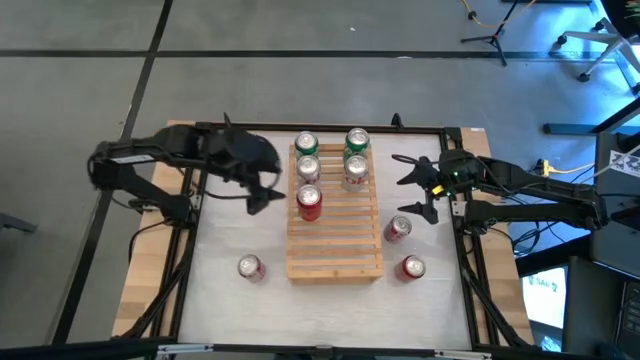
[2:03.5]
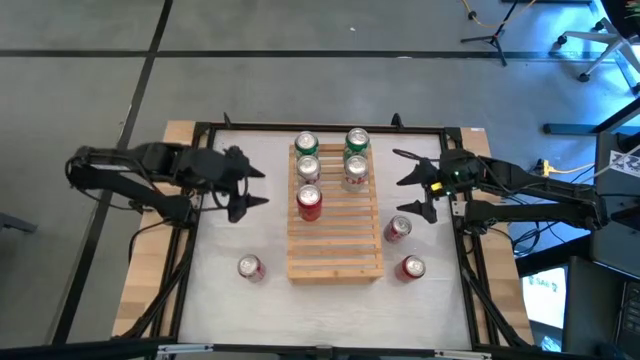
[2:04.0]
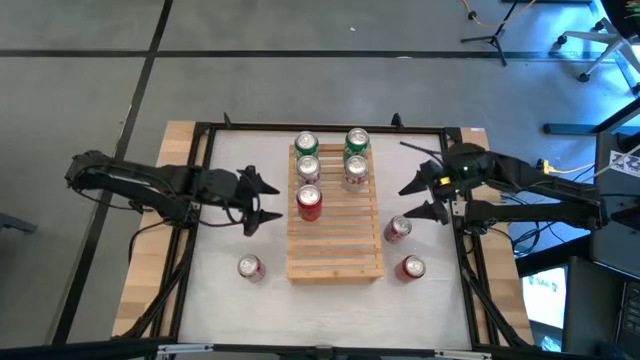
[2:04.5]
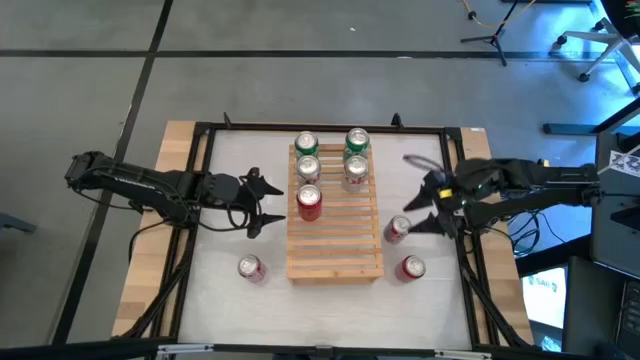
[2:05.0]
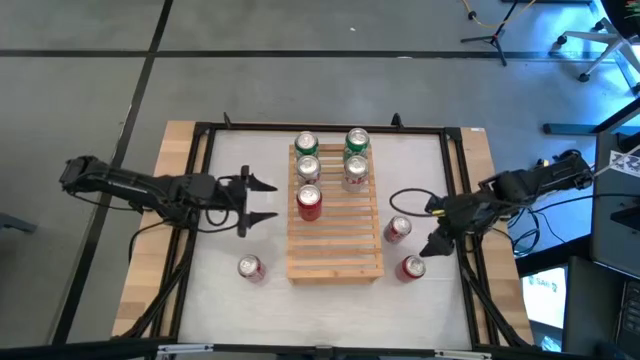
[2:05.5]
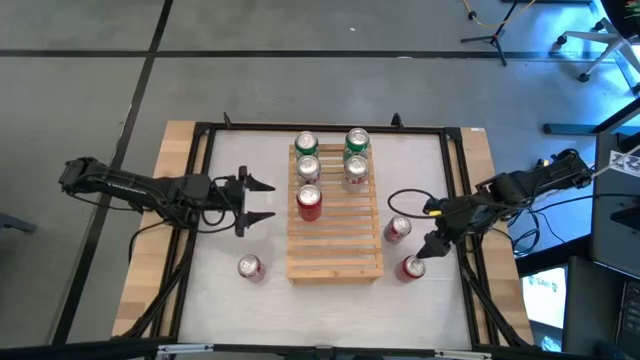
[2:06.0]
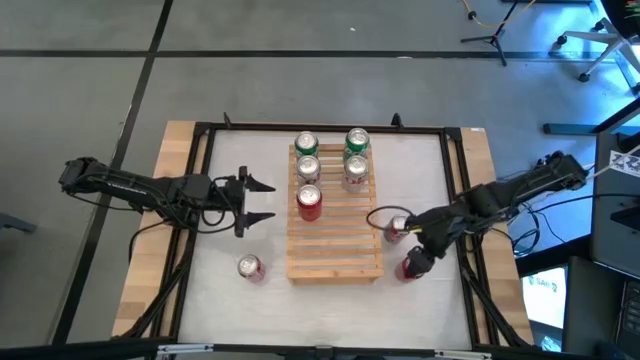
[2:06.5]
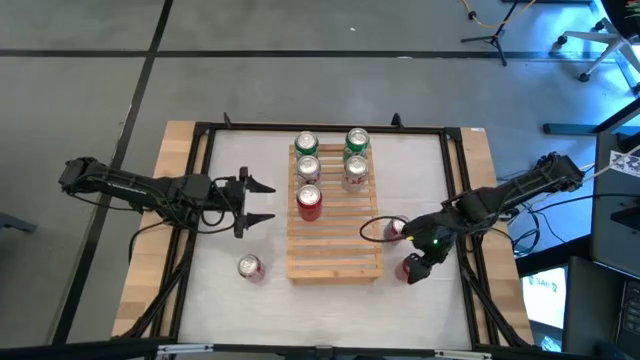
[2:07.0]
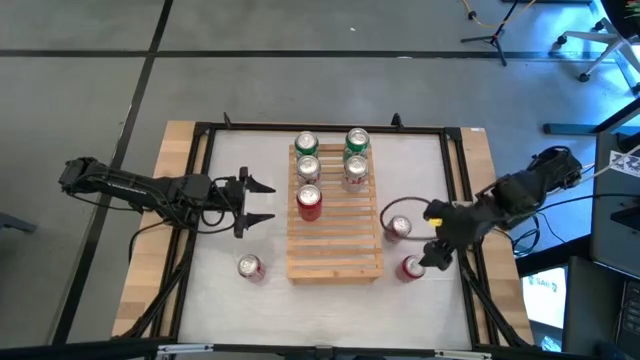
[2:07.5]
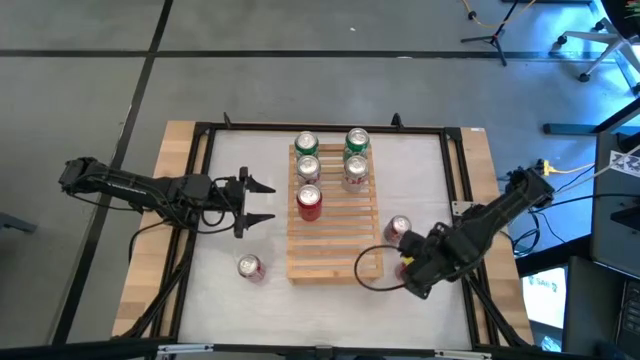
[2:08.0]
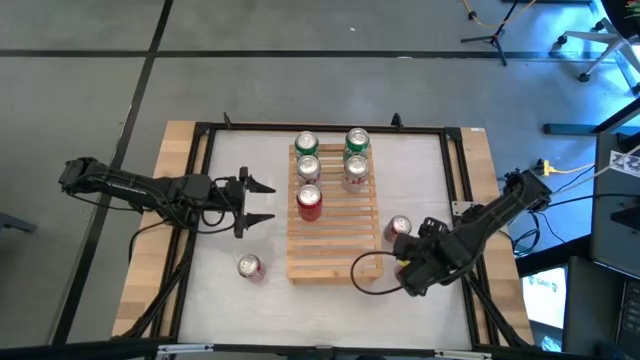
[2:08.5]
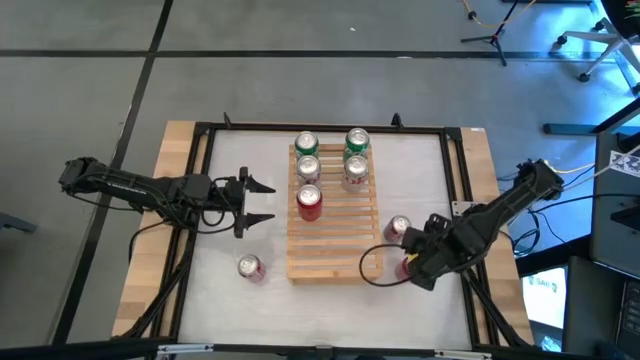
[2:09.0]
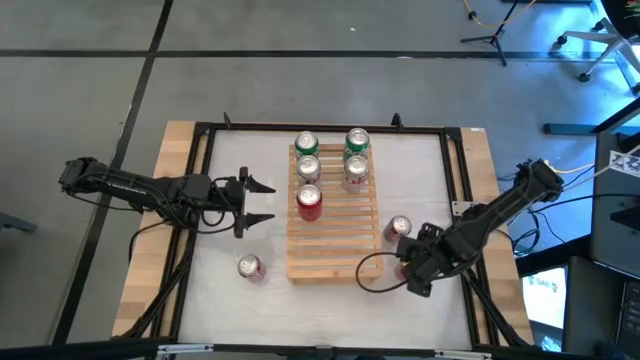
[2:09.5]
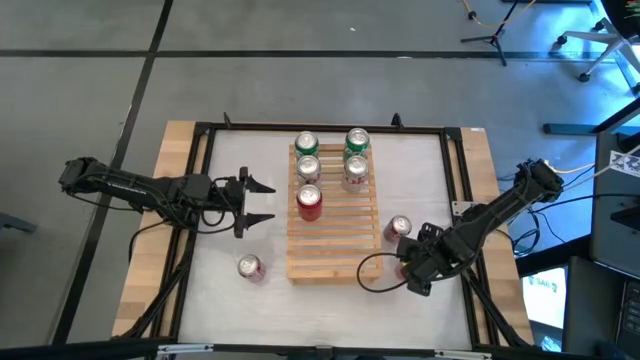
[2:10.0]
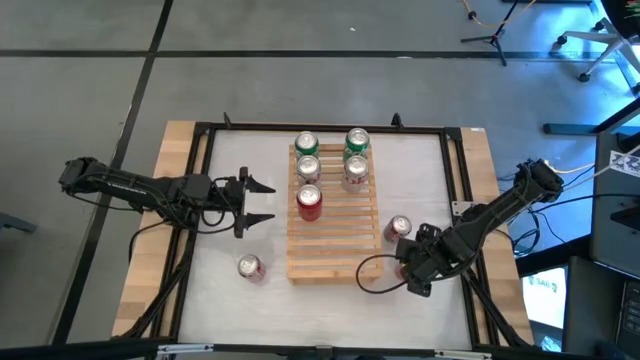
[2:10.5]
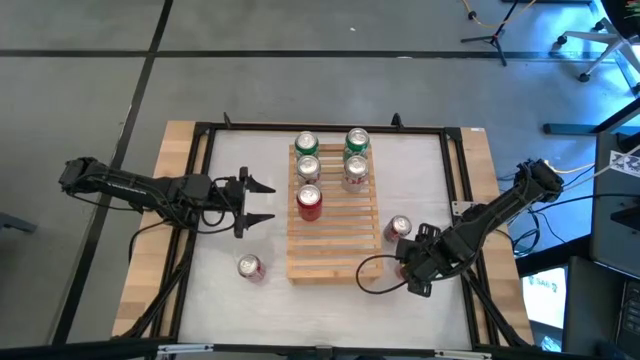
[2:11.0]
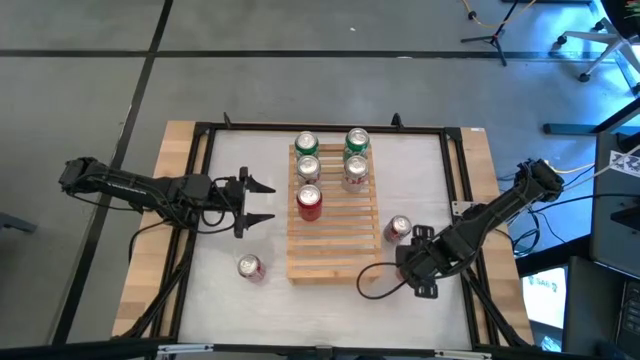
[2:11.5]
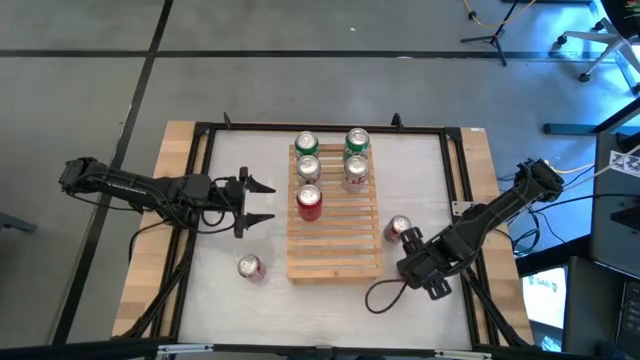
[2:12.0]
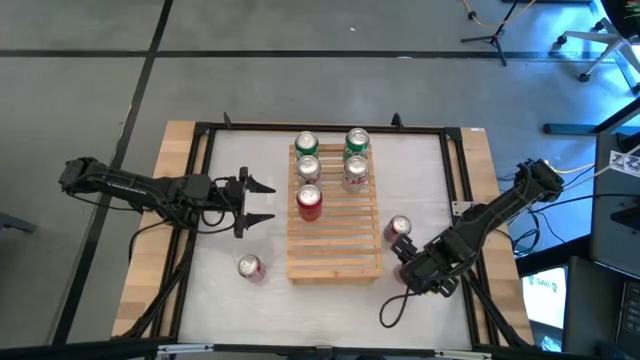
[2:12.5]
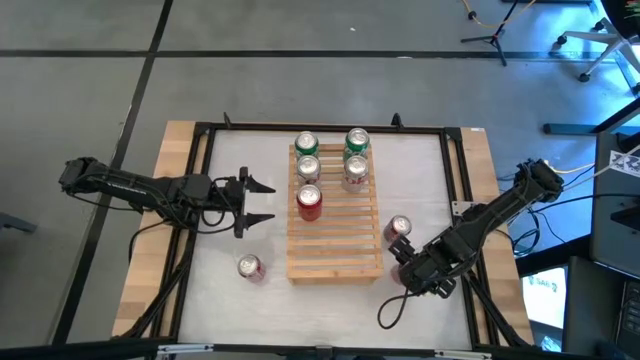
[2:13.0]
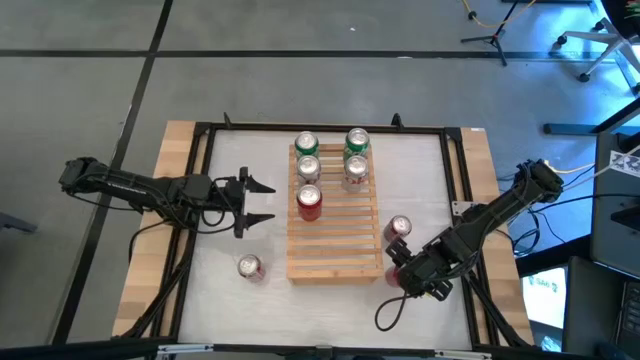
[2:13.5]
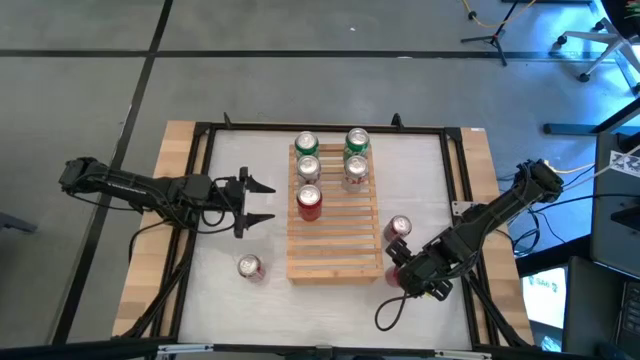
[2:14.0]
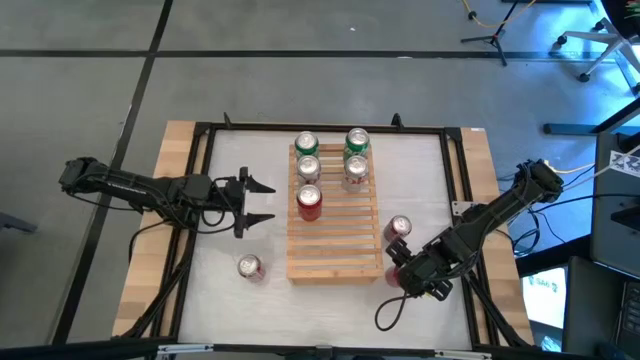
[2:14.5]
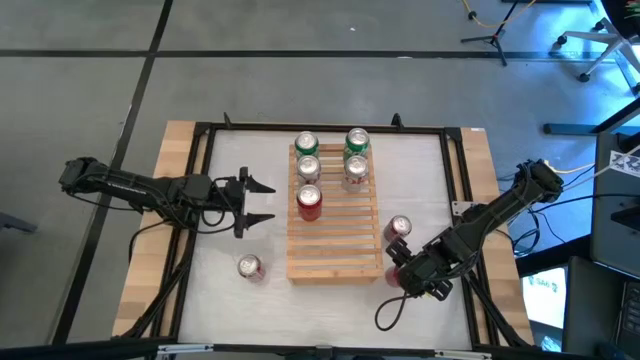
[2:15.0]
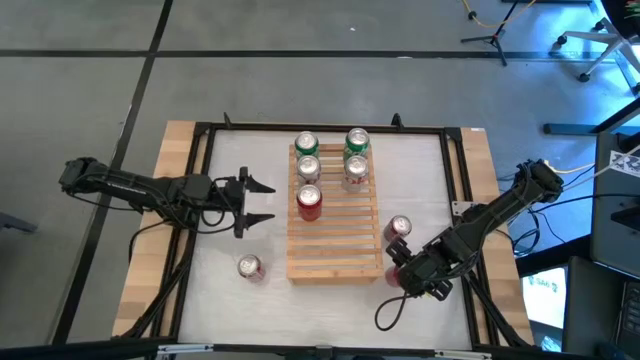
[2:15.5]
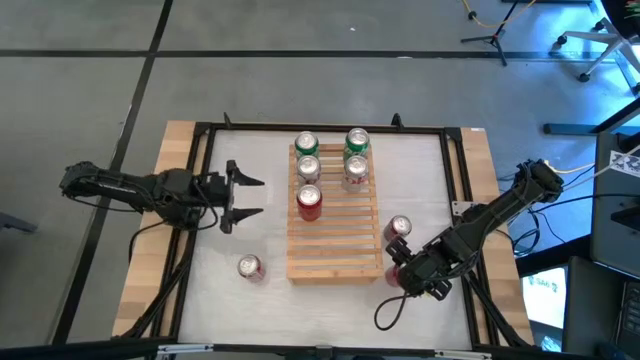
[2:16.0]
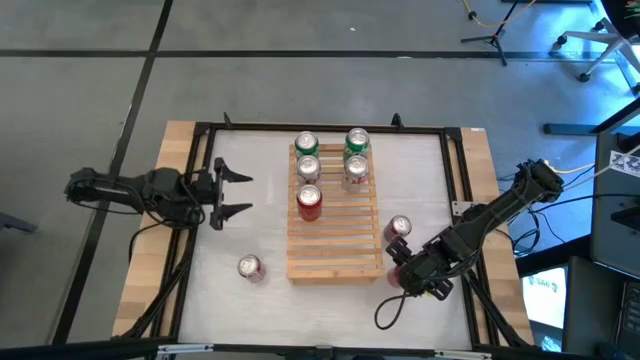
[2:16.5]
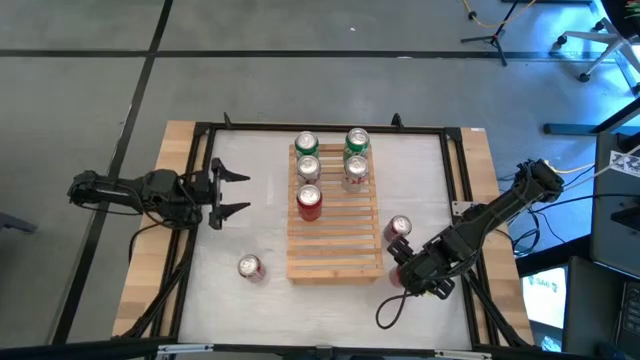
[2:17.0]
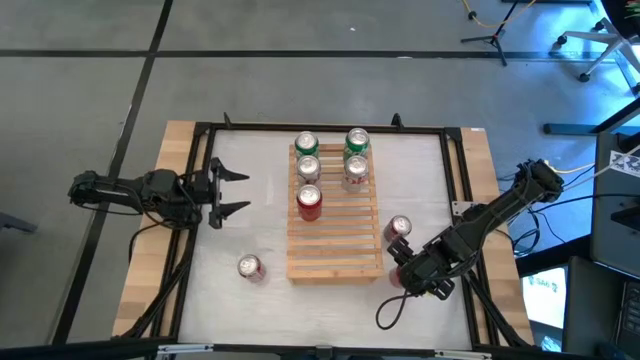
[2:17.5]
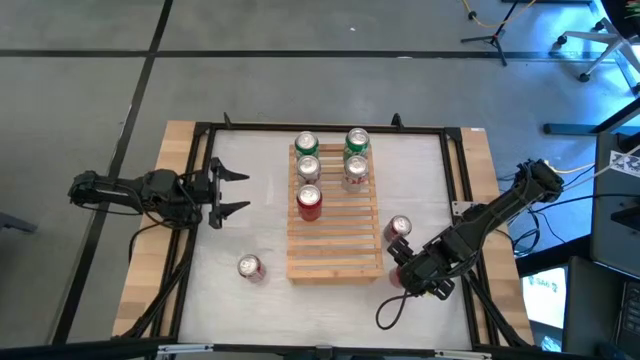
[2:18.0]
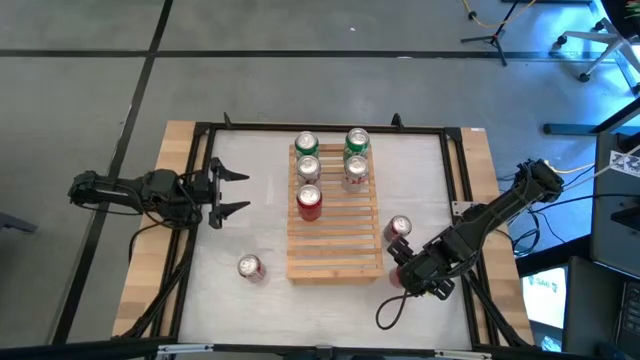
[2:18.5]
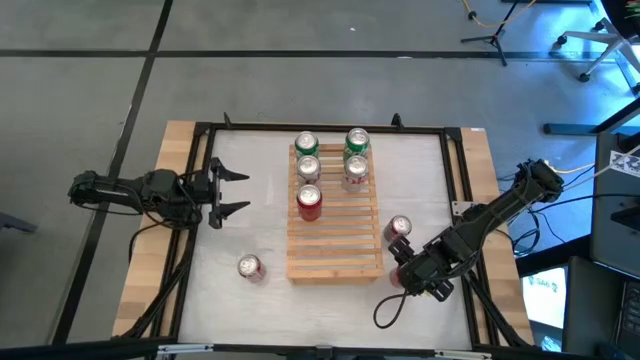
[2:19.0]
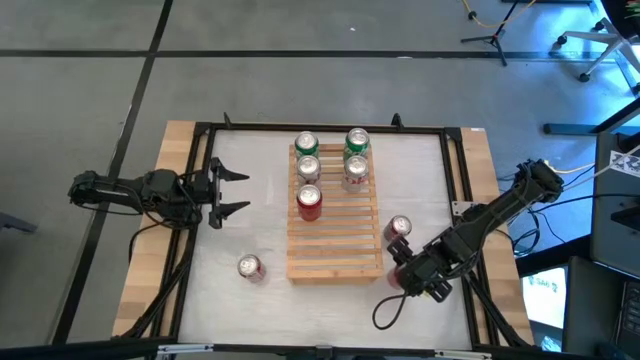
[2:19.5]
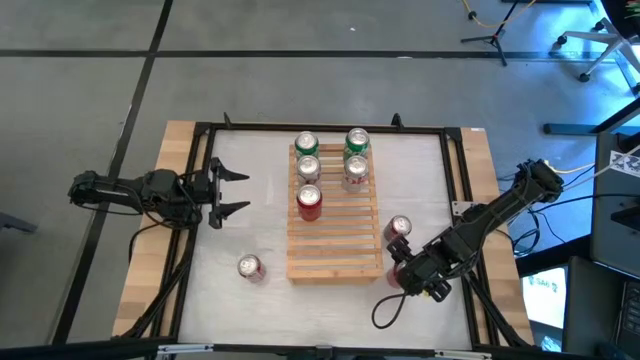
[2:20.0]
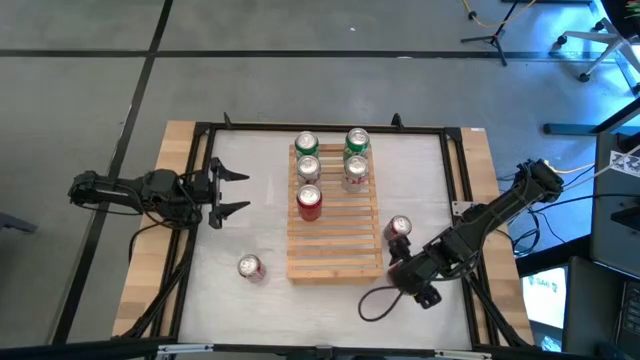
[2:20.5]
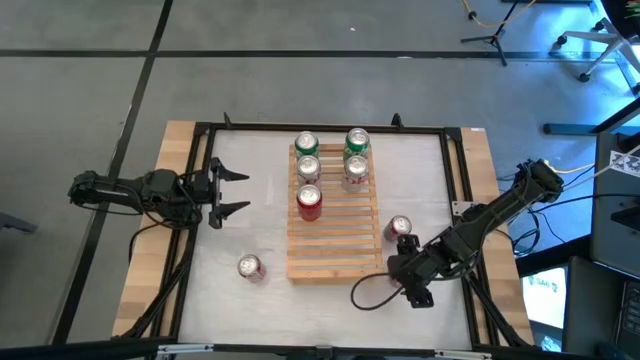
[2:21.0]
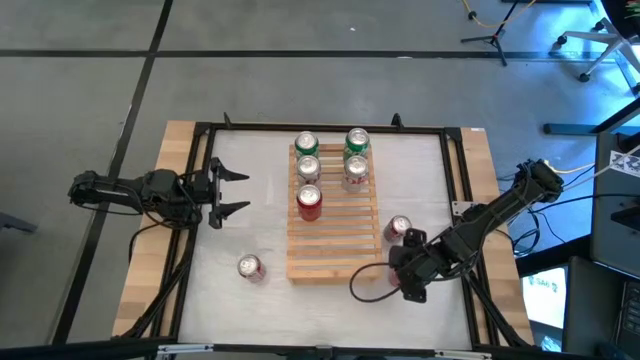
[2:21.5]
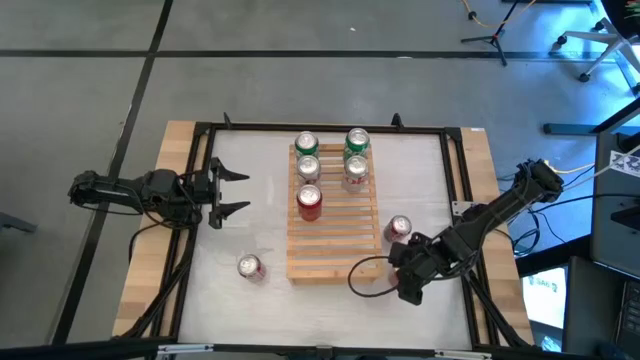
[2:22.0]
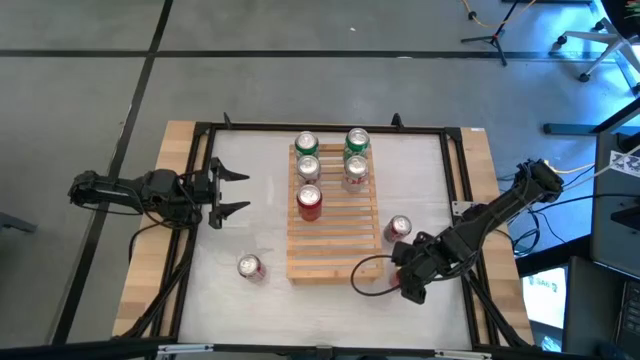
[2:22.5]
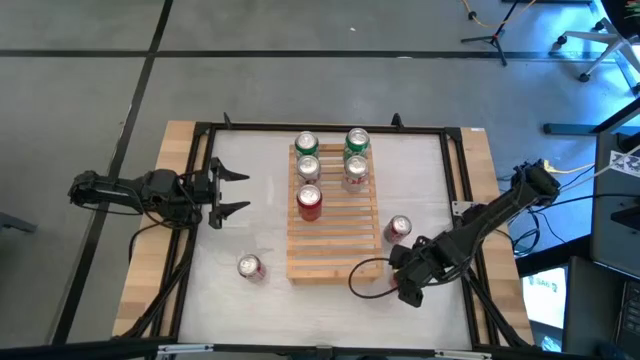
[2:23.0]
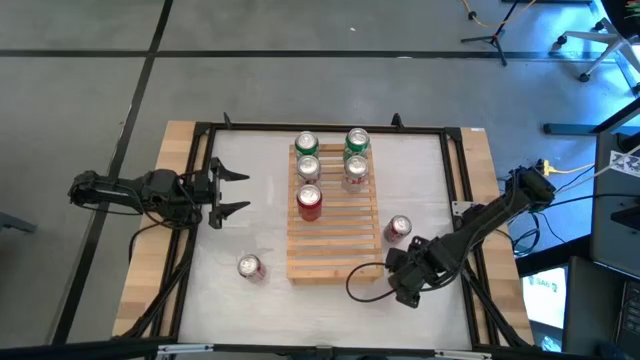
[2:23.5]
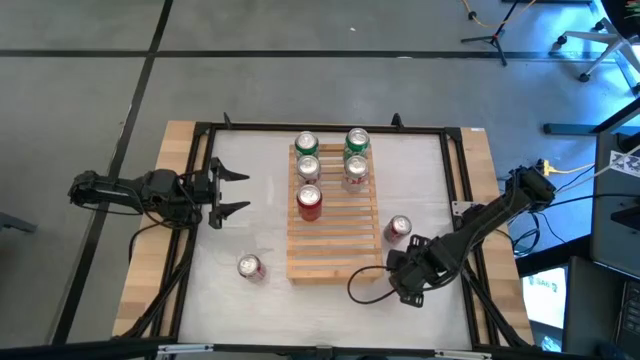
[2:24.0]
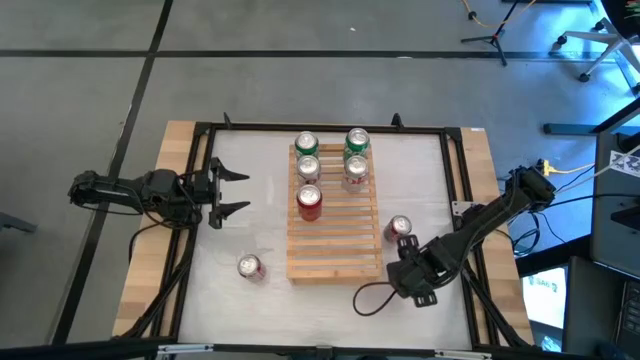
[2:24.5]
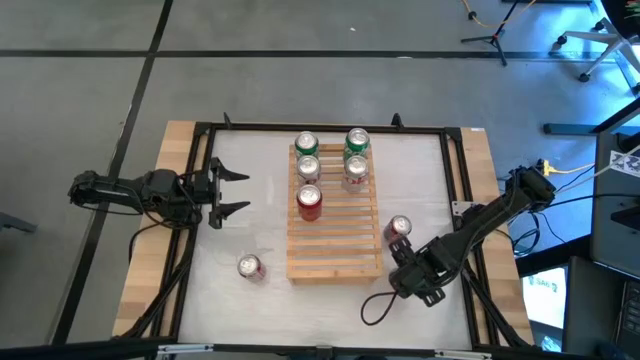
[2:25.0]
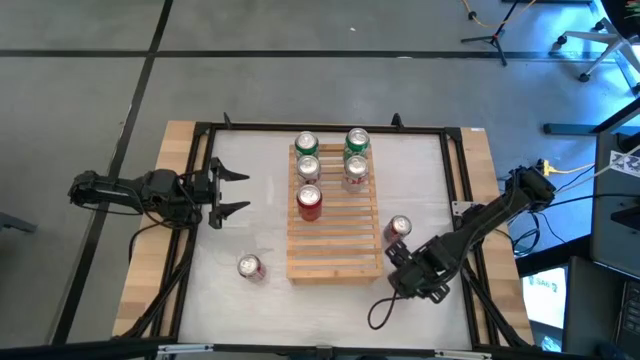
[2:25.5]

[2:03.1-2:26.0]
Task: Place canned beverage on shelf
Put the red and black soda can on the shelf aligned with the red and black soda can
